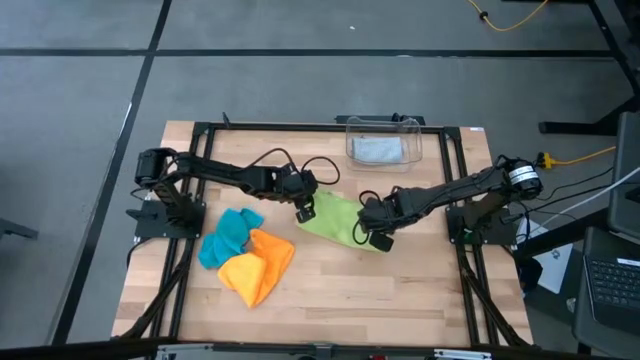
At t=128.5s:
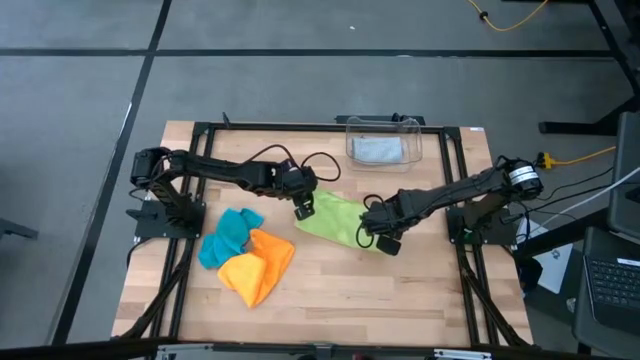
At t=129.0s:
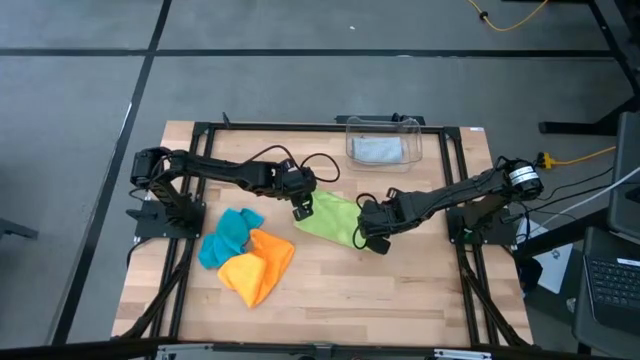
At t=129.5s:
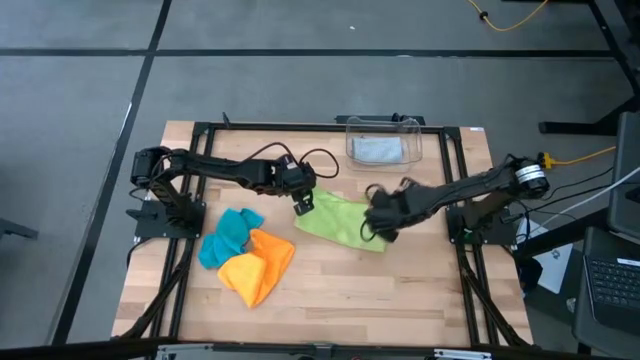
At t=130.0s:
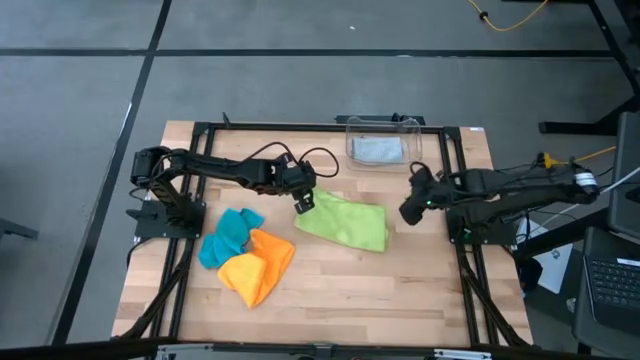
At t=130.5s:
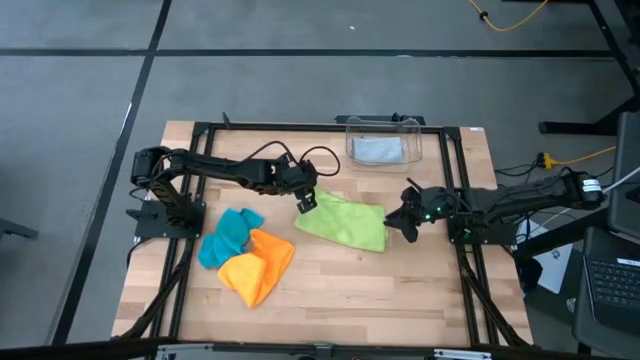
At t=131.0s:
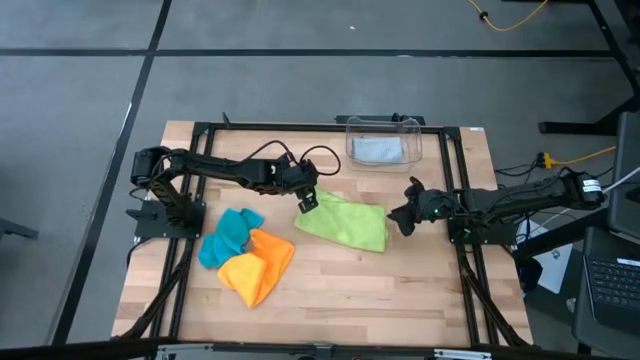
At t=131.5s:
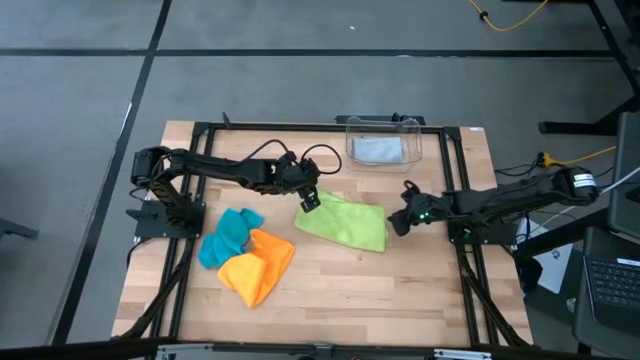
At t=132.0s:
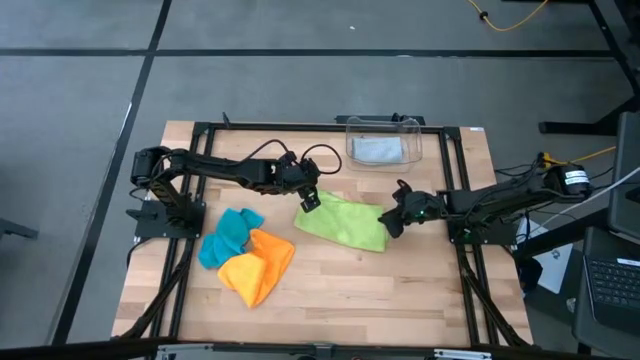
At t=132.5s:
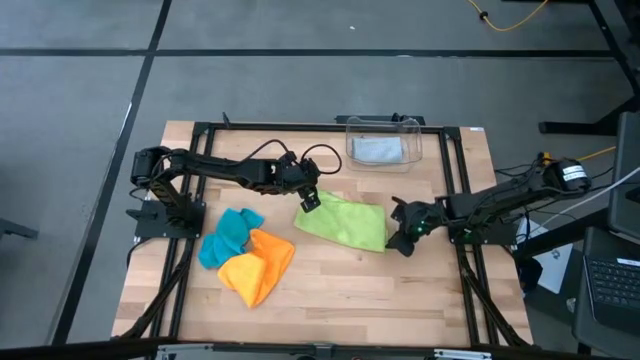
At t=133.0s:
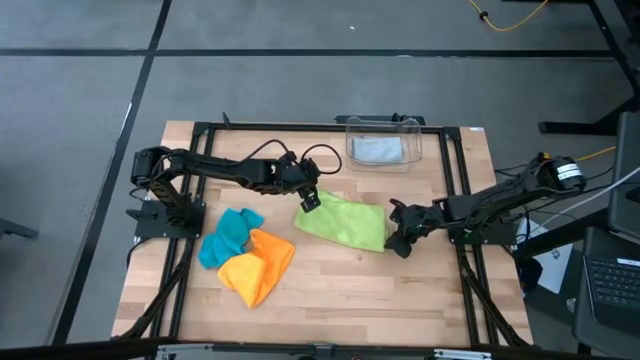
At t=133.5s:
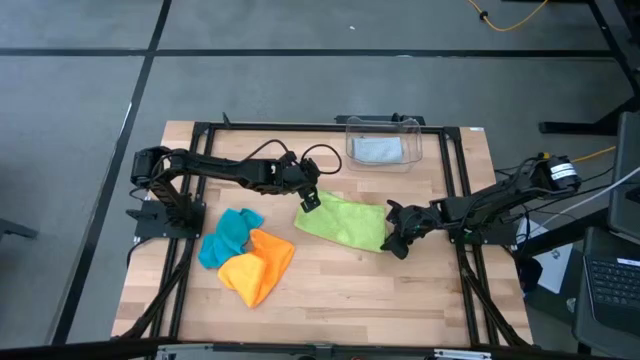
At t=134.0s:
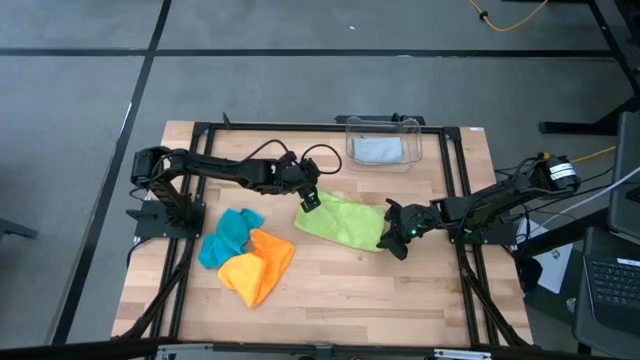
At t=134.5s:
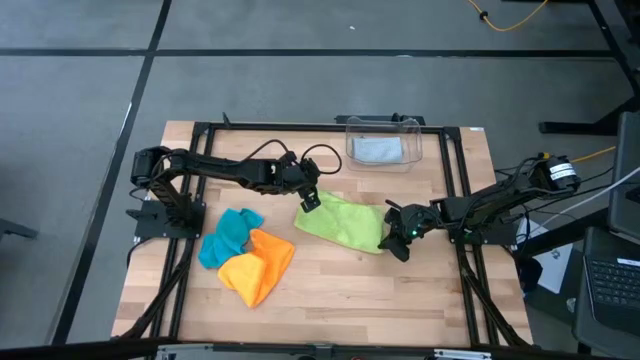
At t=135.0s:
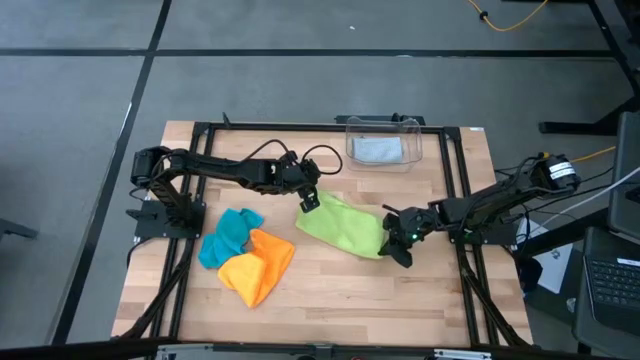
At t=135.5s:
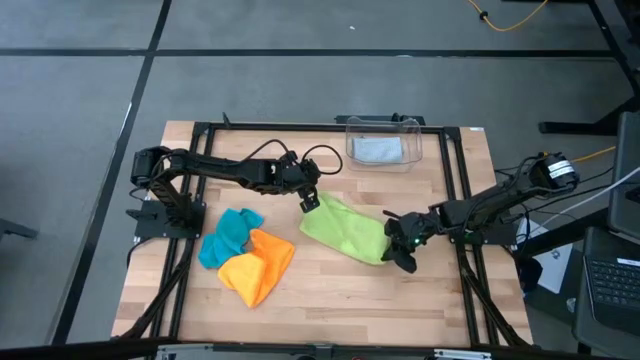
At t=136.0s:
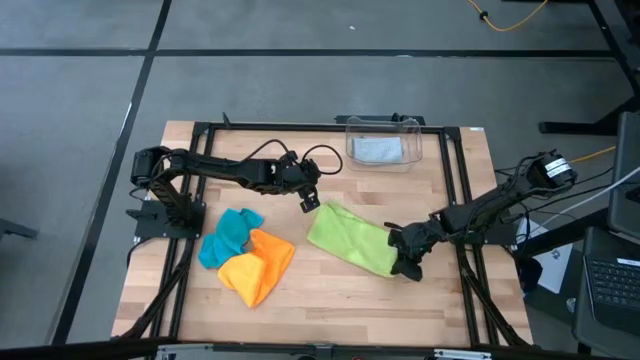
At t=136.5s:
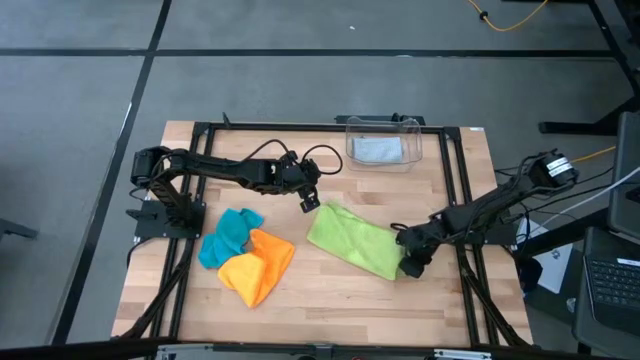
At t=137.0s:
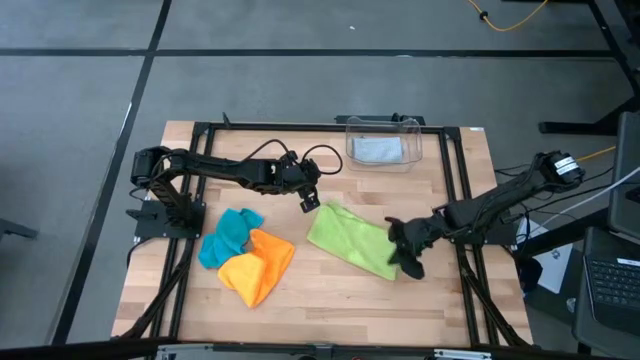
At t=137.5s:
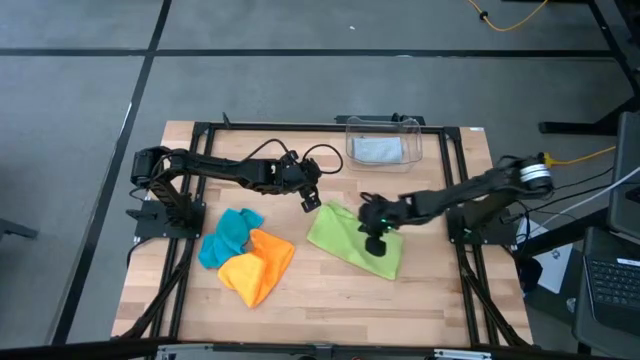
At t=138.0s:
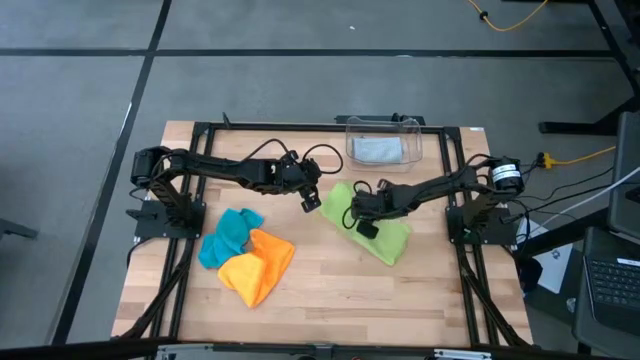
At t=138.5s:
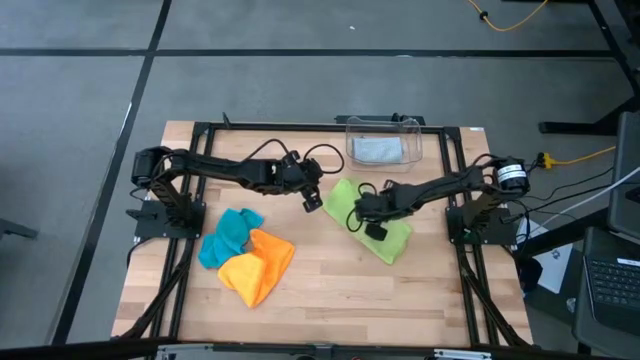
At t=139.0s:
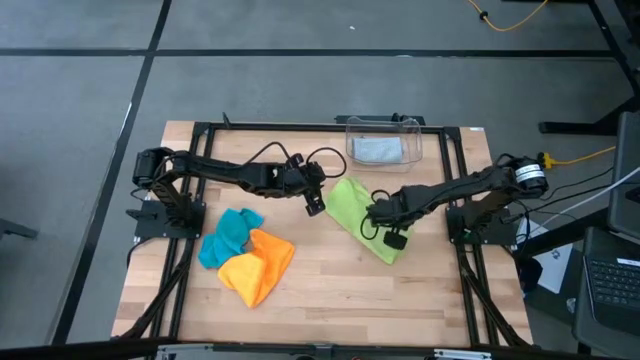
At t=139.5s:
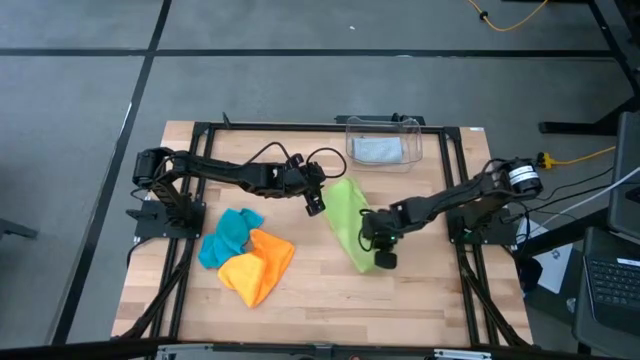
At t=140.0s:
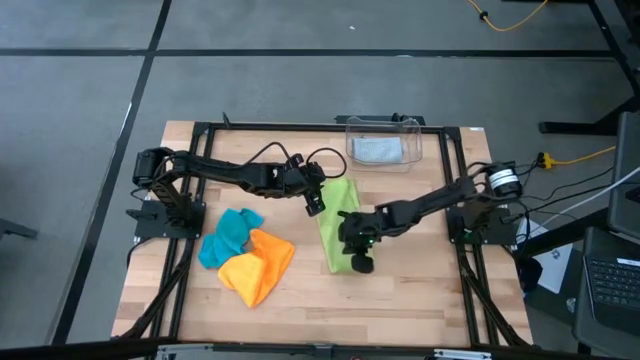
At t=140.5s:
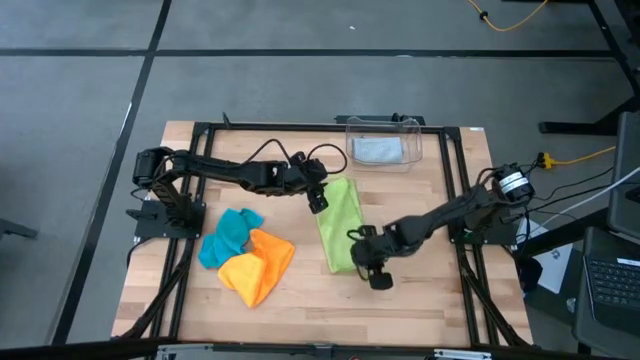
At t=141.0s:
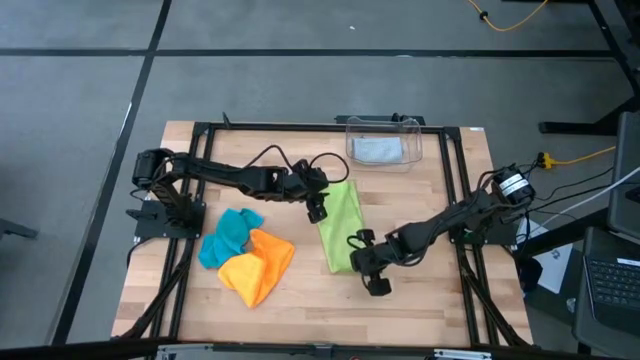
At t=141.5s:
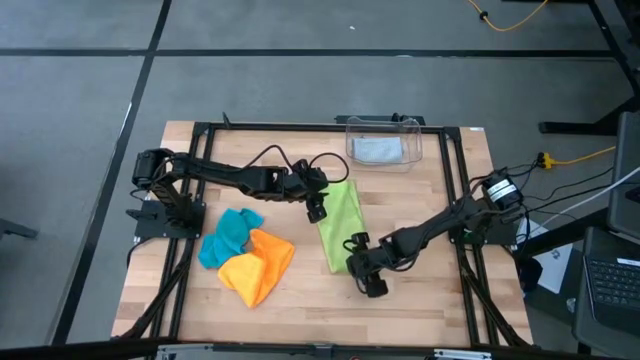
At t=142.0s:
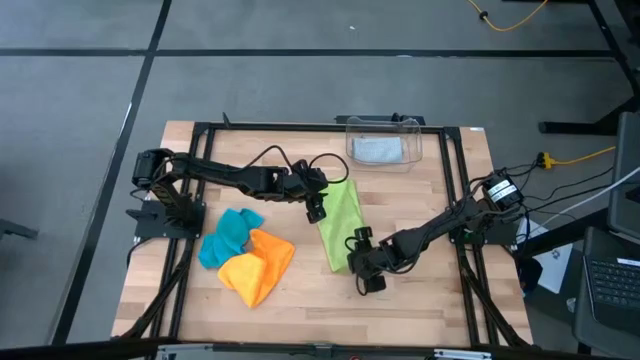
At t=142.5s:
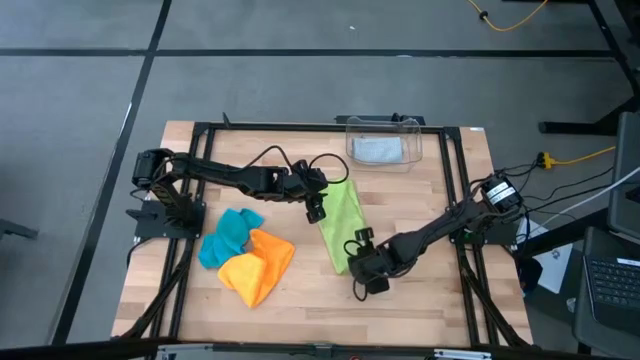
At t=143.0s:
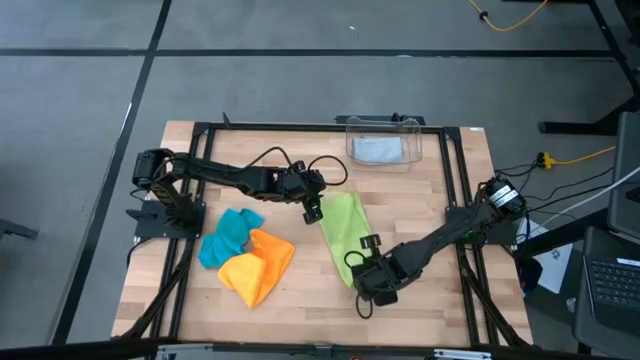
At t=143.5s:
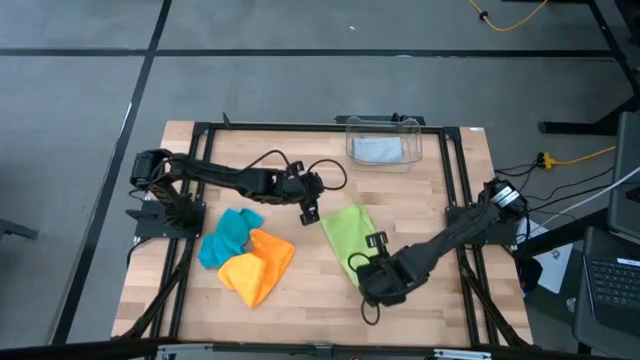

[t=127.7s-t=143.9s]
Task: Fold microfiber towels
Fold the green microfiber

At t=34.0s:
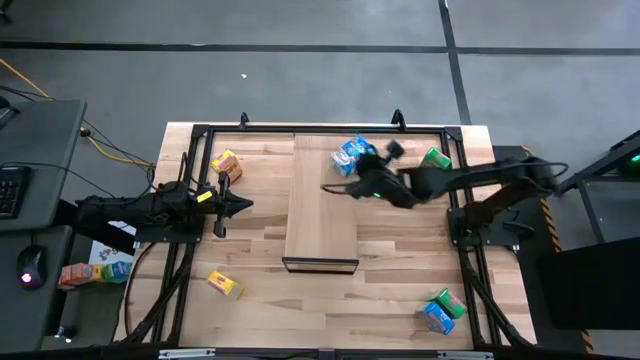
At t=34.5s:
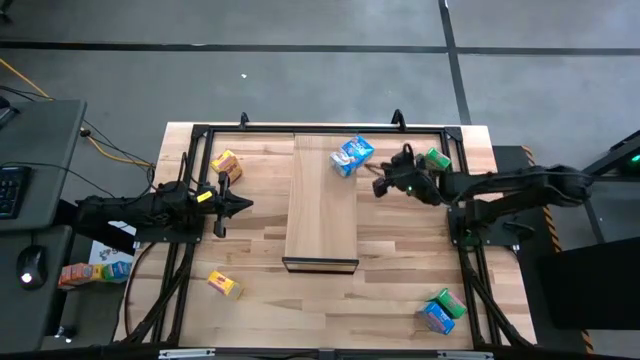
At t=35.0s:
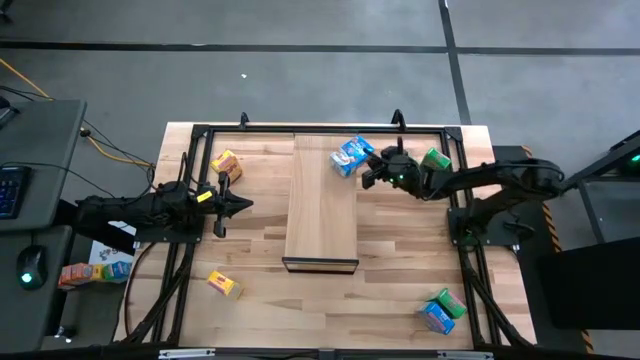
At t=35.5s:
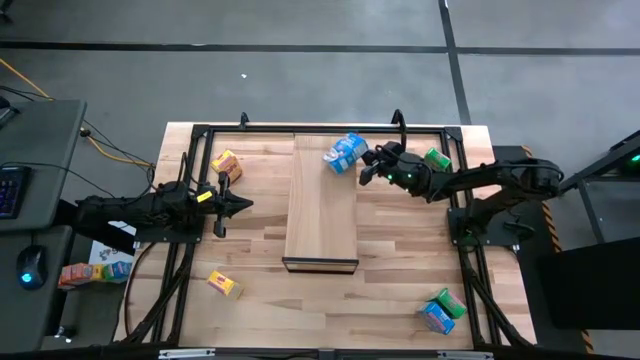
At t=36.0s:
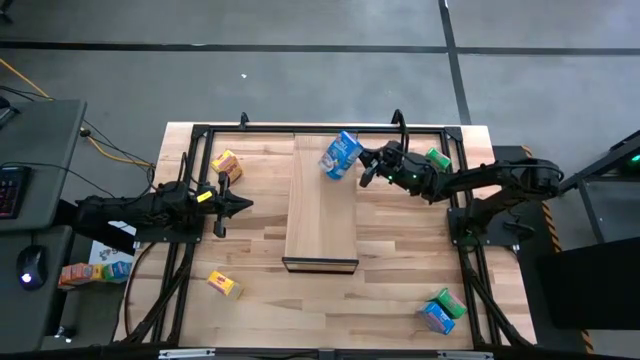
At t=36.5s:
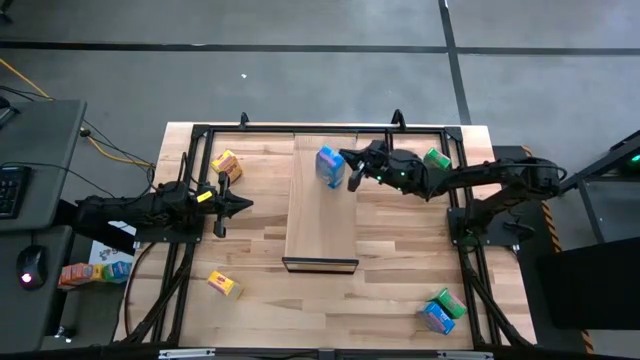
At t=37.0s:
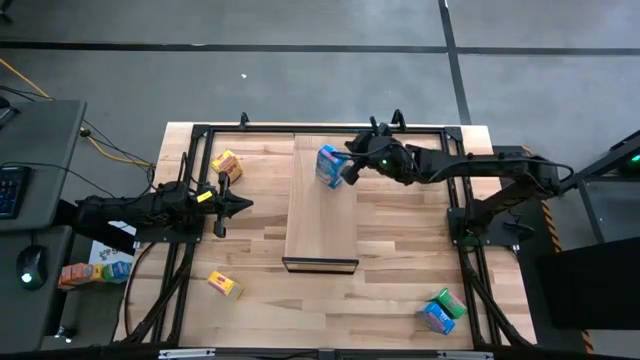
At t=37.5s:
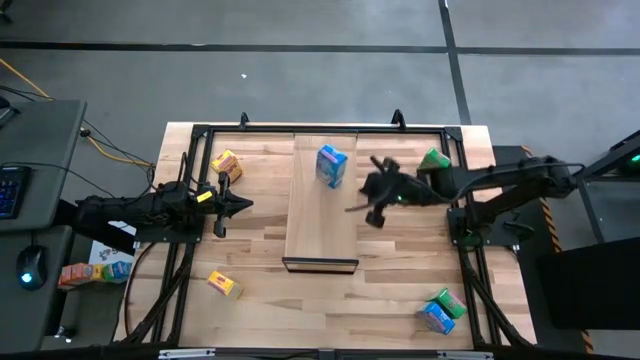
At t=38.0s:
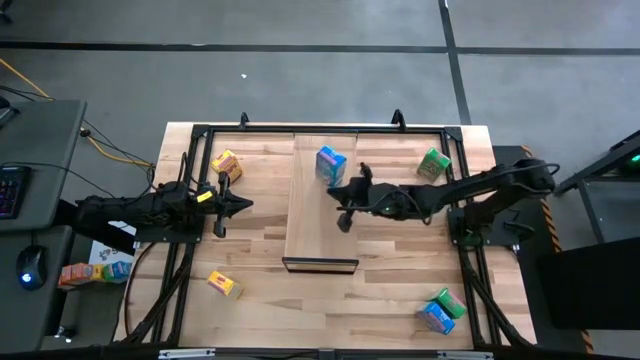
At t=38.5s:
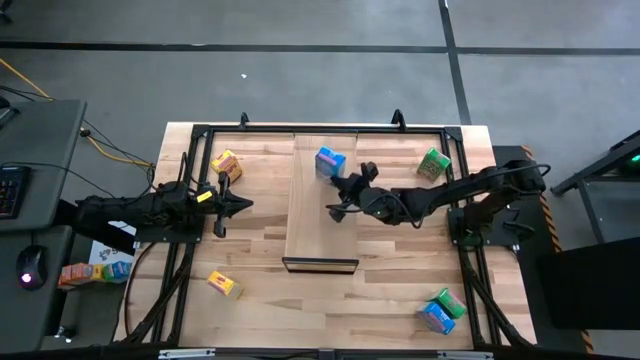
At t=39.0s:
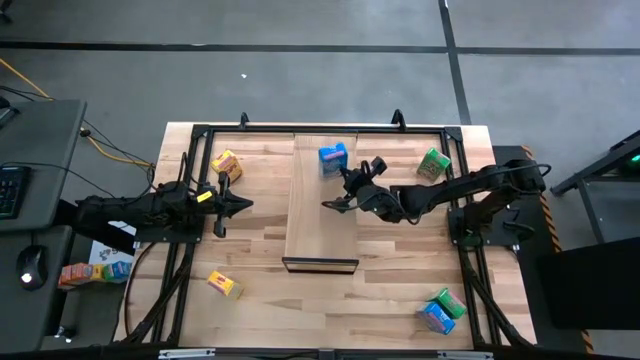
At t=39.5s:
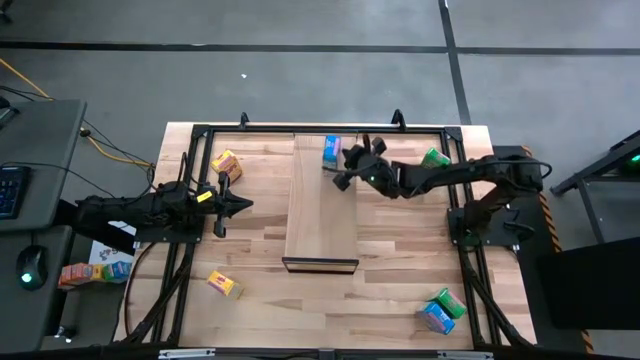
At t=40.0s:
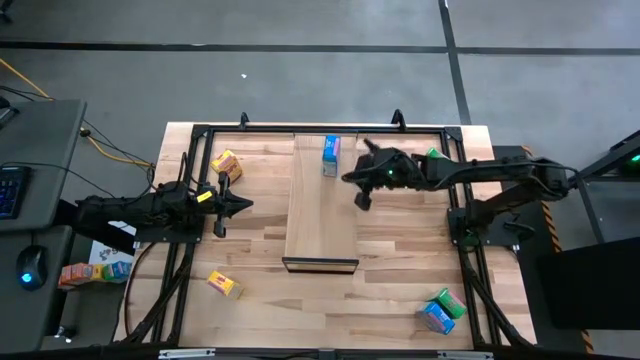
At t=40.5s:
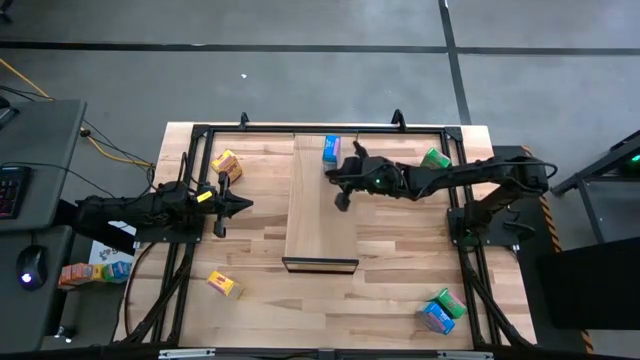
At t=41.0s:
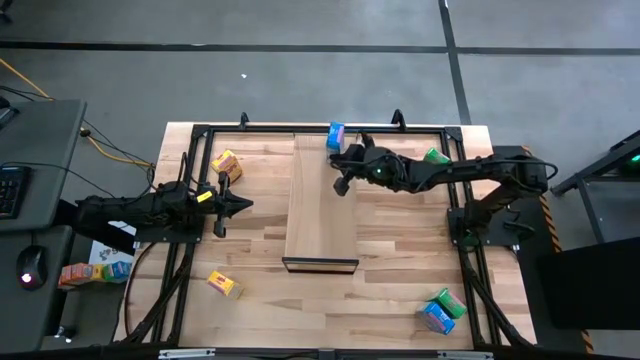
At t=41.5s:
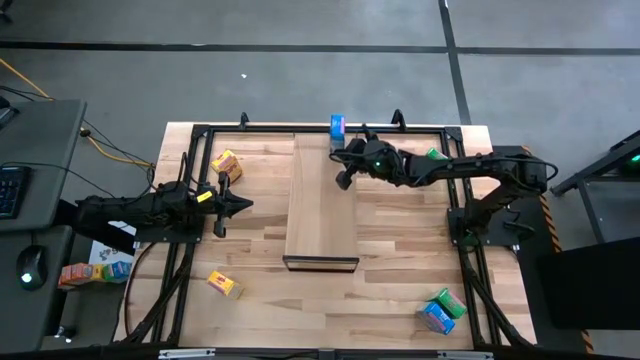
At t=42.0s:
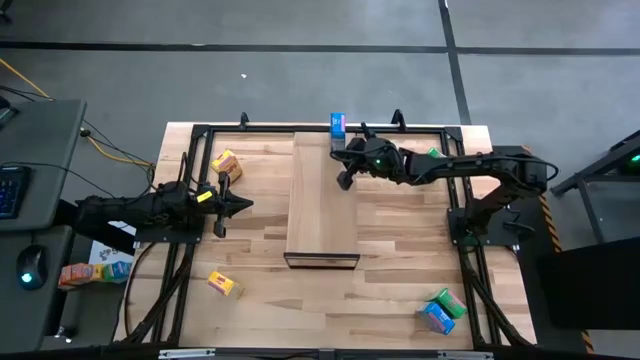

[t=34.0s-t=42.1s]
Task: Stack cereal on shelf
Adjust the blue cereal box on the shelf
